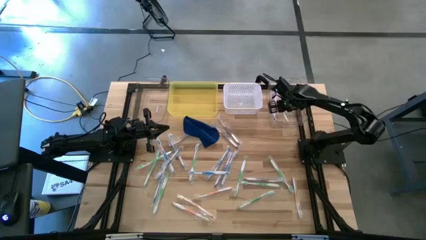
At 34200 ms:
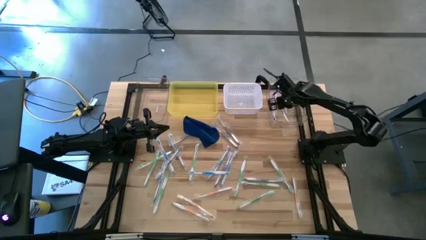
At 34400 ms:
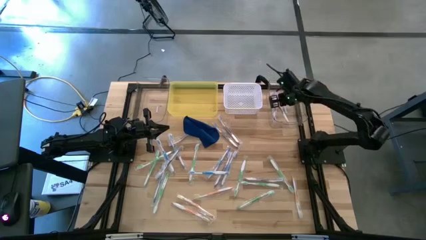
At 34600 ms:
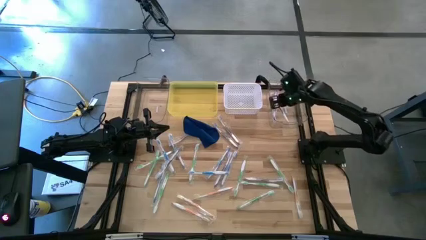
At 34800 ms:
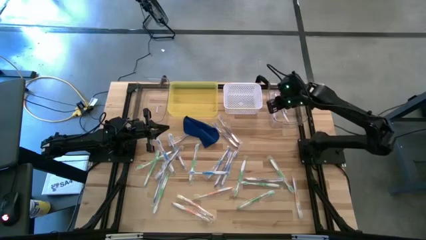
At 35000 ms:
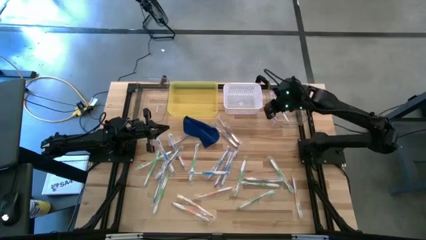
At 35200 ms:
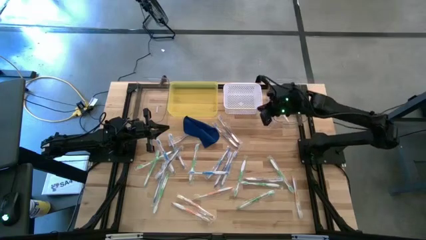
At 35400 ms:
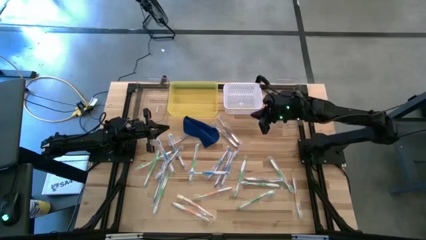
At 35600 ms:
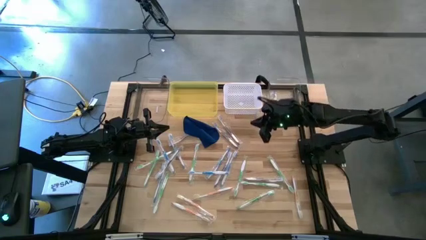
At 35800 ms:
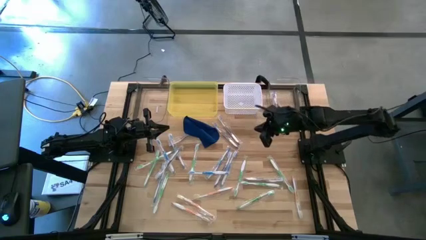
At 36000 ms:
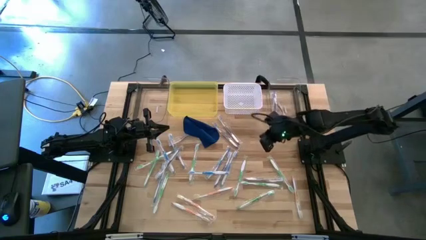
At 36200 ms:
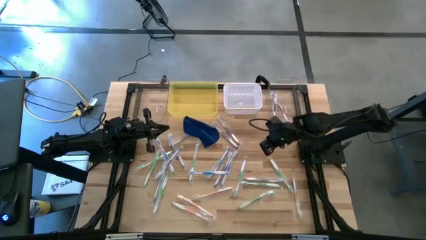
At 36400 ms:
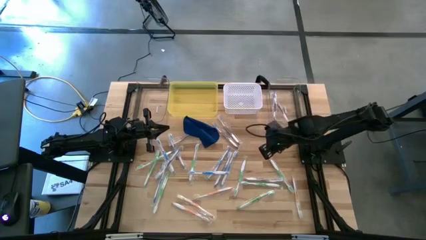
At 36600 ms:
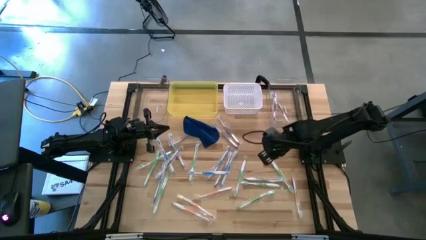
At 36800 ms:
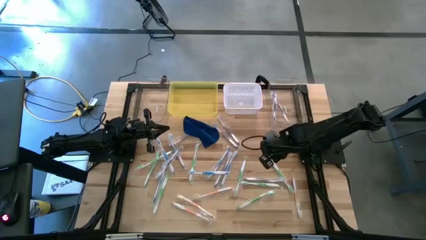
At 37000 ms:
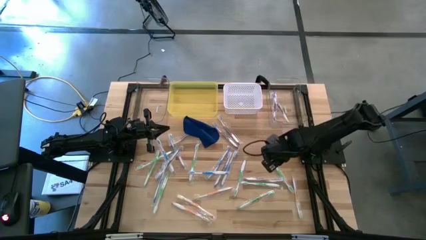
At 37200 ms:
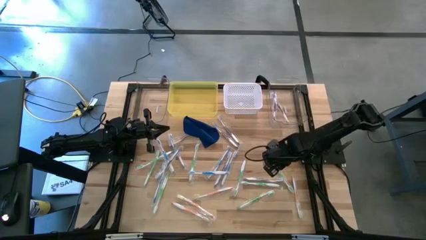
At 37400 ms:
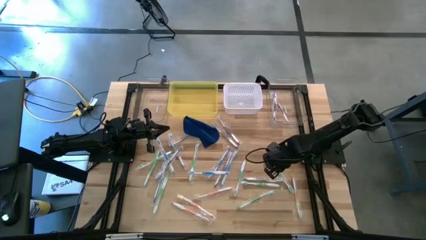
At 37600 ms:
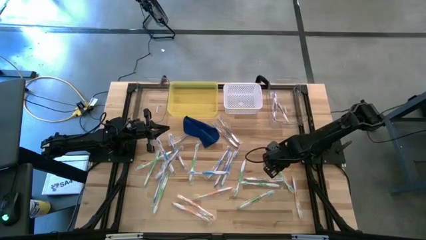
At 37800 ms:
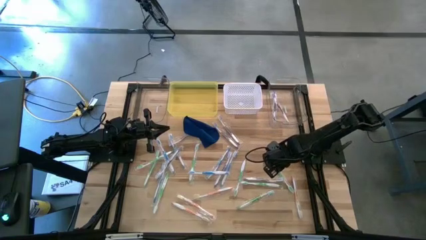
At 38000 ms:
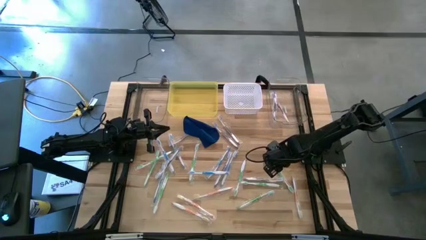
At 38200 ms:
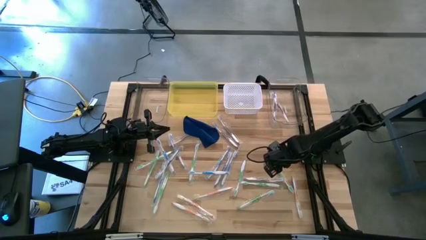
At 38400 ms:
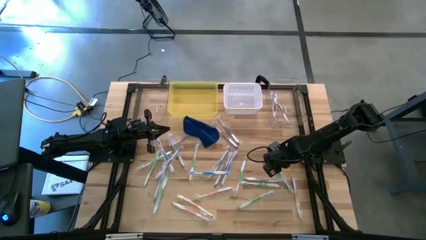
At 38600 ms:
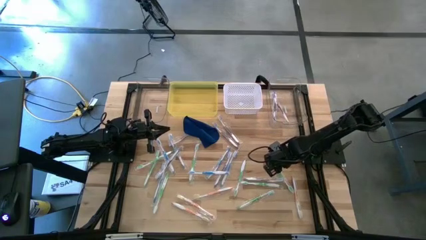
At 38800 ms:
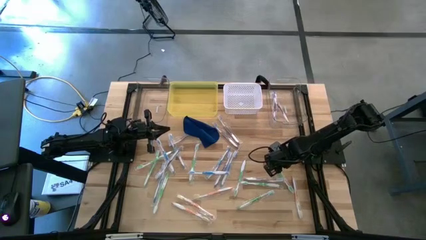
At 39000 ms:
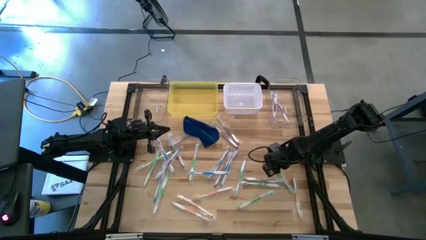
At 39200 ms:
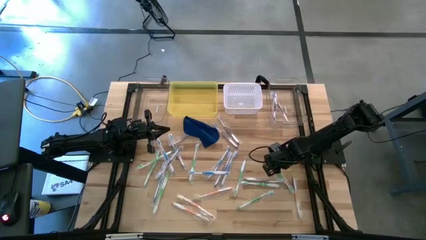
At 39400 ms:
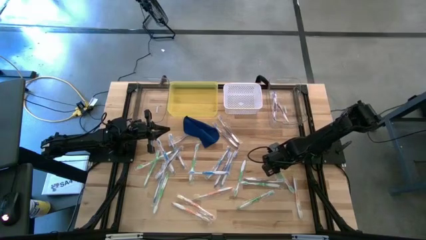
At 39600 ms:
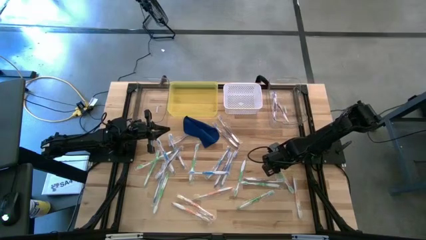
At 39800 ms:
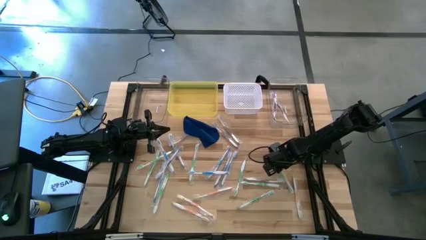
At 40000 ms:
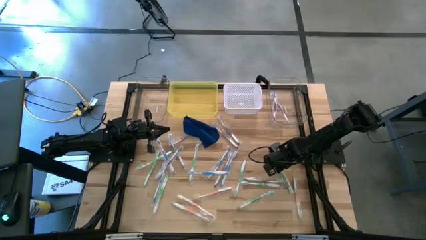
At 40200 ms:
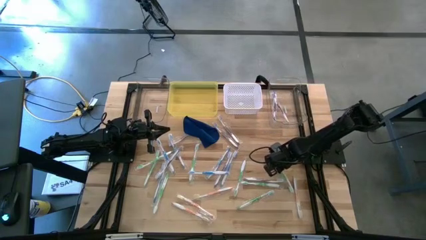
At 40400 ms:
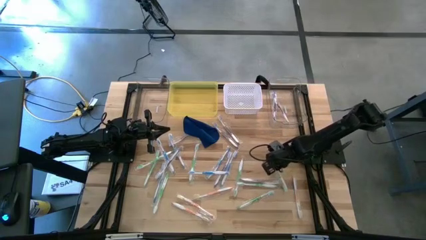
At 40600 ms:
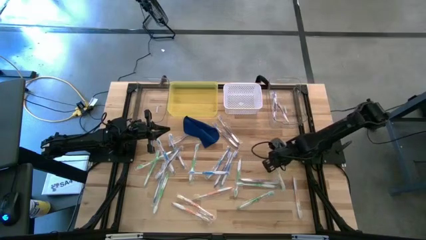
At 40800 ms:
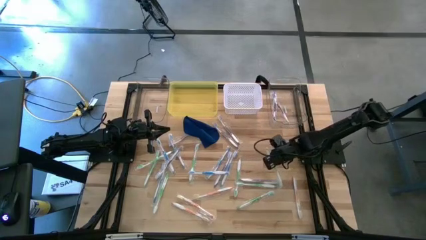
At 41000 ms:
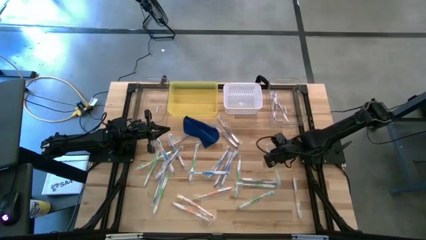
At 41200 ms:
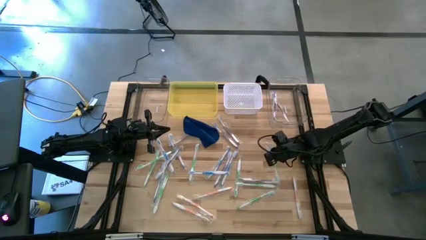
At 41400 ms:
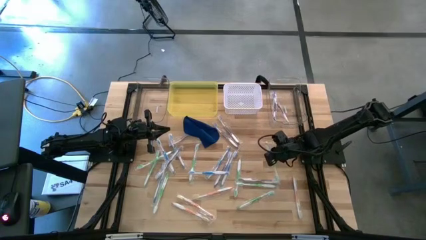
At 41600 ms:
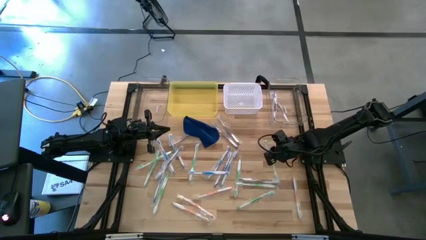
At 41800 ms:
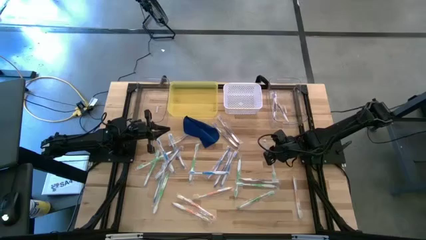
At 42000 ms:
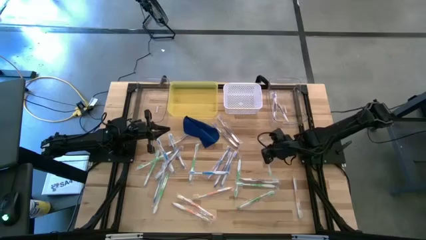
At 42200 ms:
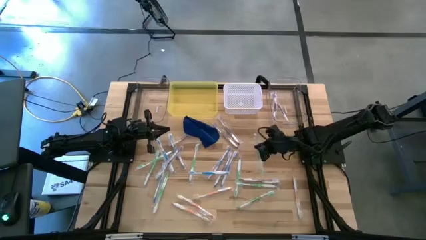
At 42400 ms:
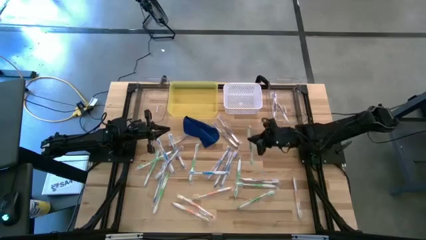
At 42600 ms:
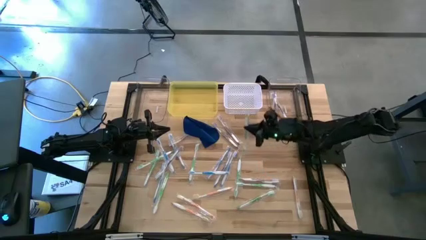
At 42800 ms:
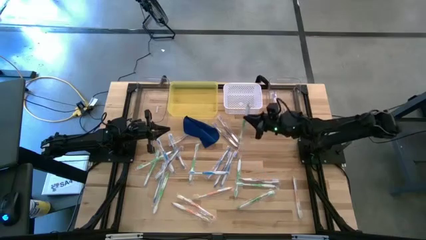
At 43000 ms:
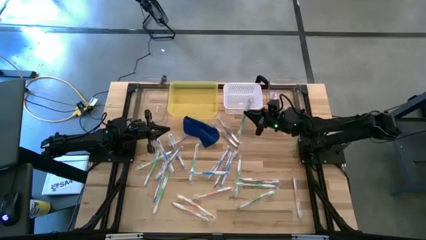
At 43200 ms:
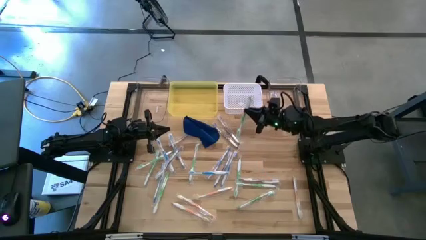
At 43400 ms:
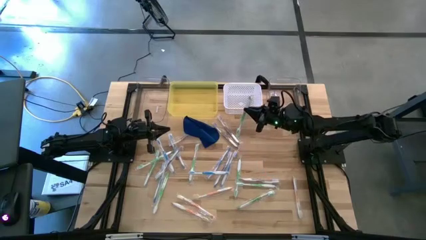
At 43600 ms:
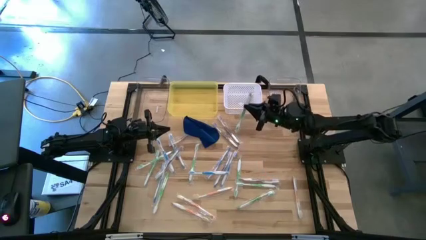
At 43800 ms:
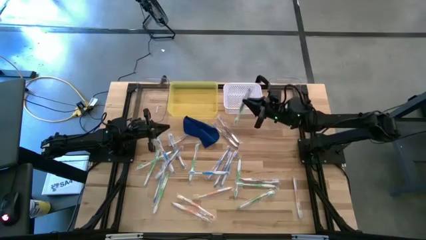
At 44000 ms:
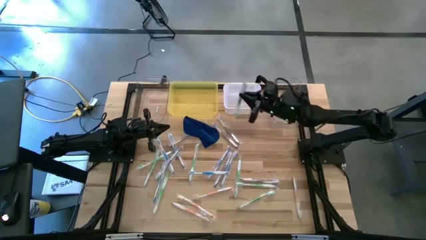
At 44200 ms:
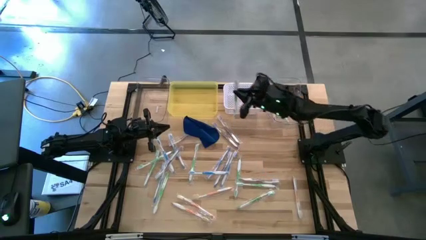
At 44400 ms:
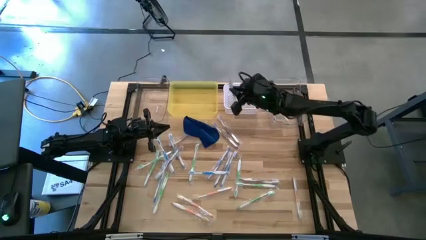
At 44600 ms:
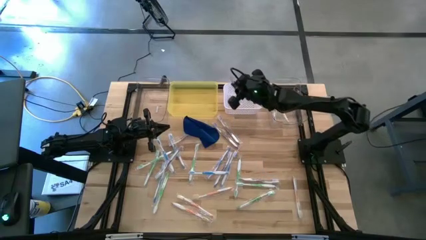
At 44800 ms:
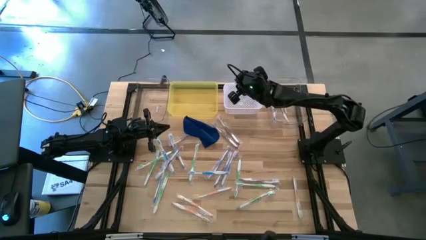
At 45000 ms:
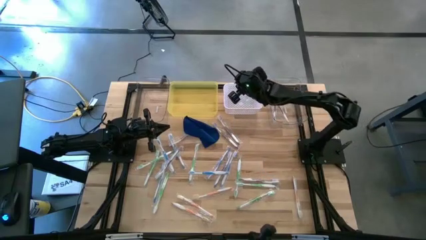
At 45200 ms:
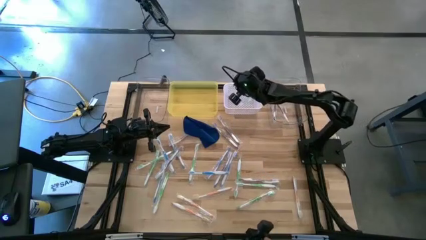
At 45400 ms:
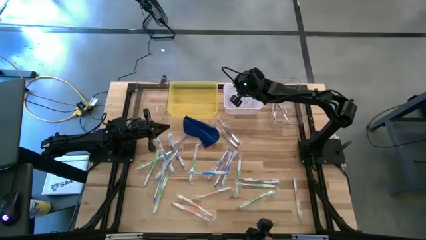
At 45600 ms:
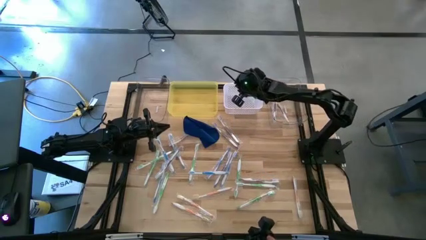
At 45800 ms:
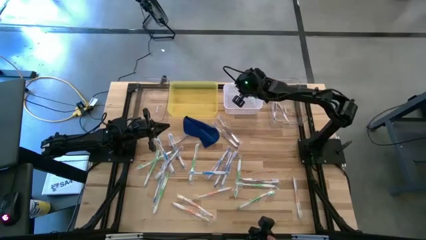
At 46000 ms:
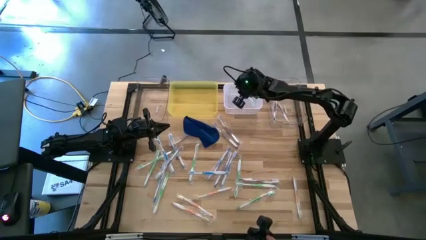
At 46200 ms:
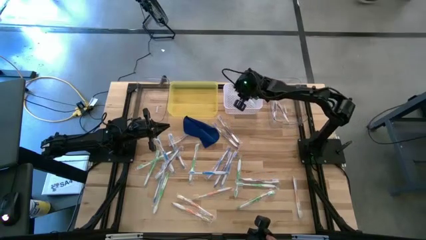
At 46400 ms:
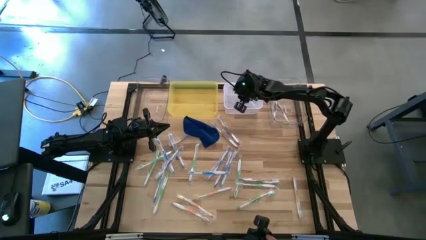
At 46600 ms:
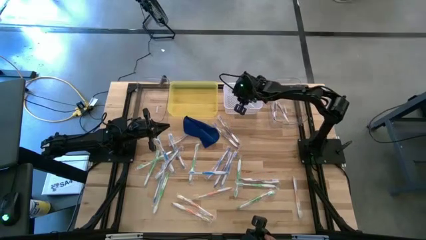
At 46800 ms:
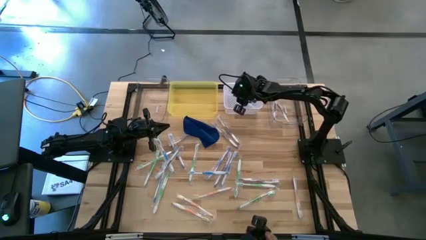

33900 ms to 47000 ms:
Task: Pick & Place Toothbrushes
Put the green toothbrush into the white bin
